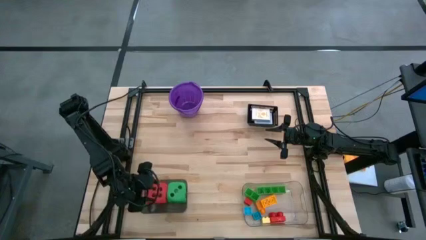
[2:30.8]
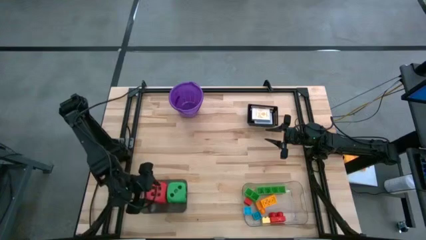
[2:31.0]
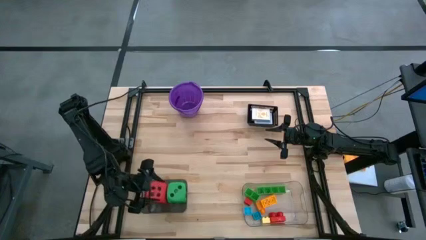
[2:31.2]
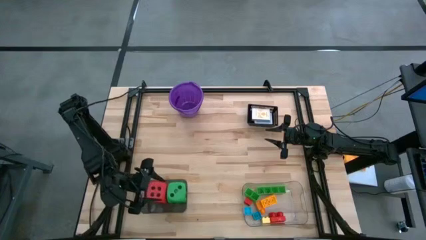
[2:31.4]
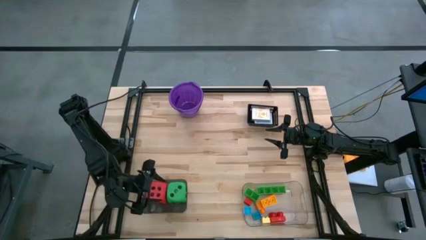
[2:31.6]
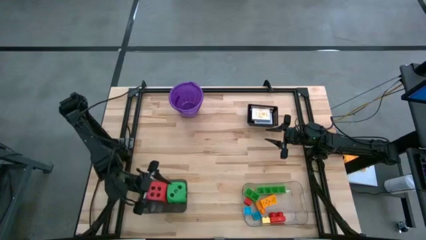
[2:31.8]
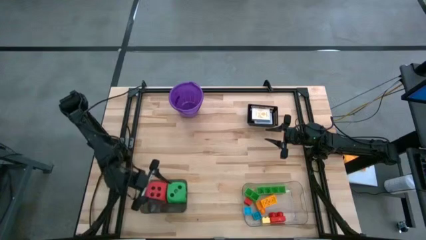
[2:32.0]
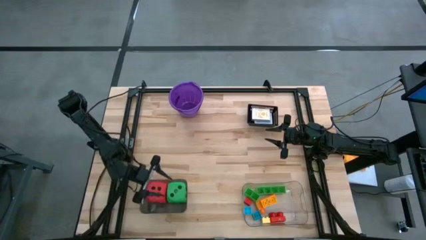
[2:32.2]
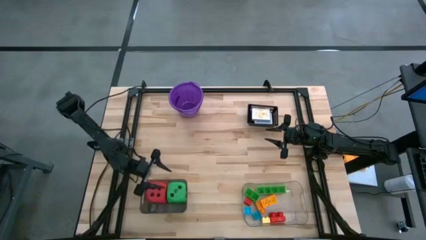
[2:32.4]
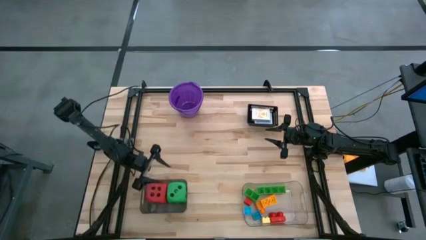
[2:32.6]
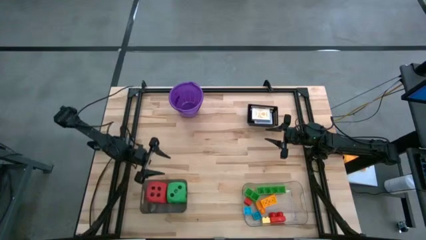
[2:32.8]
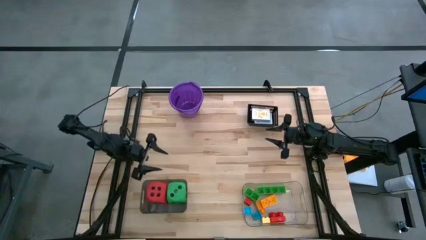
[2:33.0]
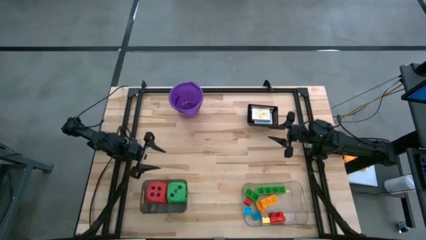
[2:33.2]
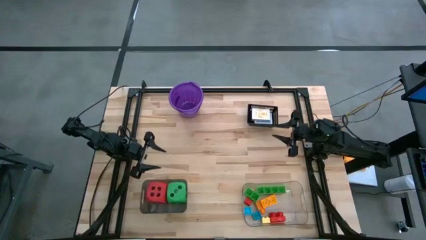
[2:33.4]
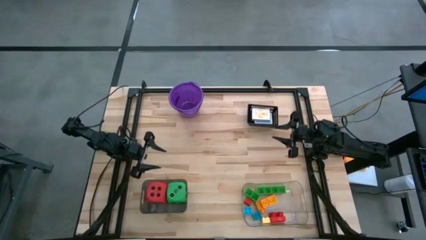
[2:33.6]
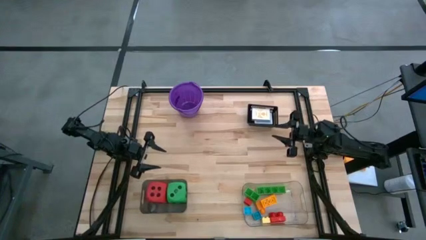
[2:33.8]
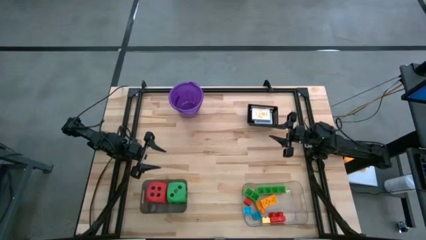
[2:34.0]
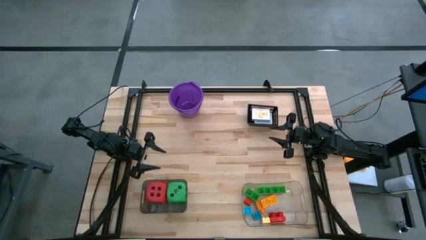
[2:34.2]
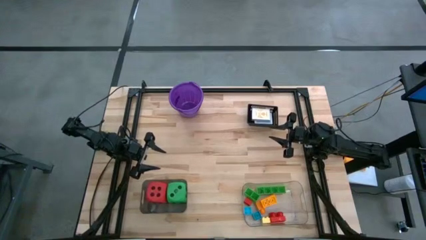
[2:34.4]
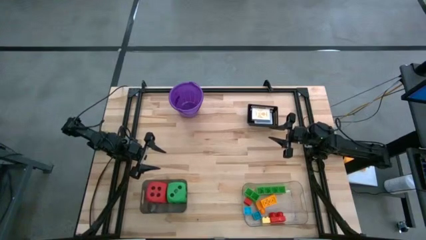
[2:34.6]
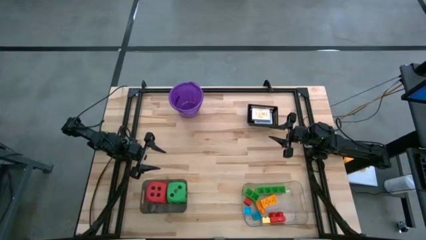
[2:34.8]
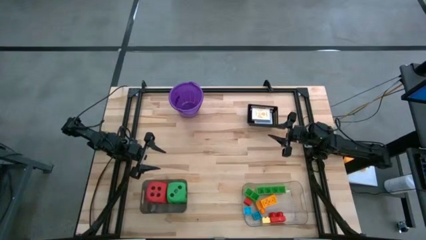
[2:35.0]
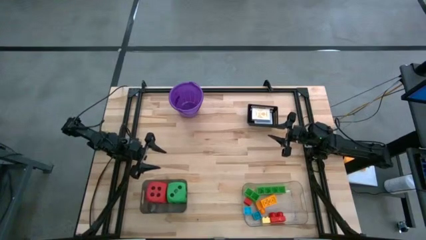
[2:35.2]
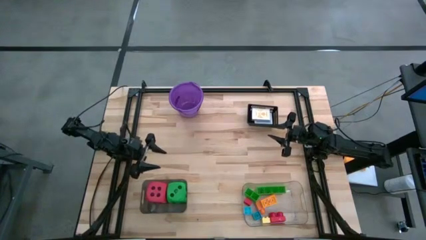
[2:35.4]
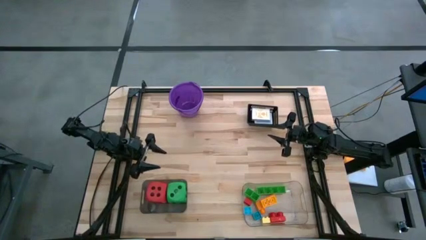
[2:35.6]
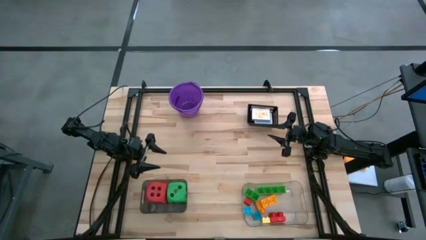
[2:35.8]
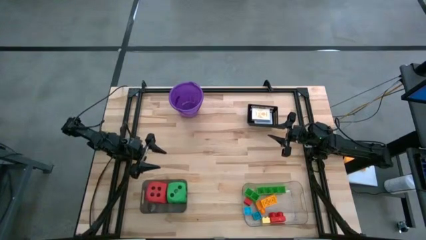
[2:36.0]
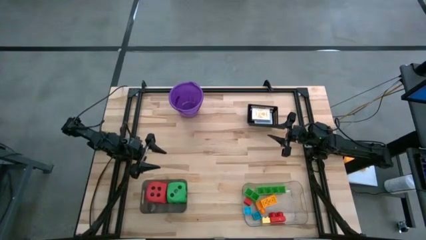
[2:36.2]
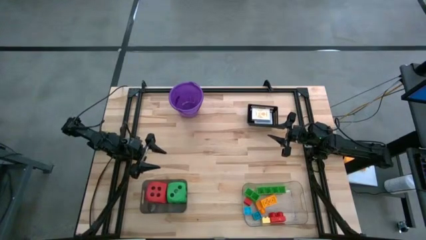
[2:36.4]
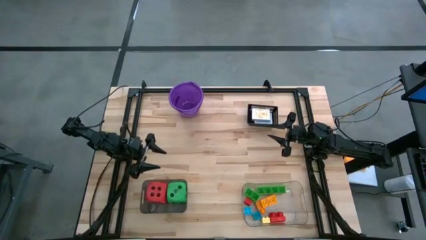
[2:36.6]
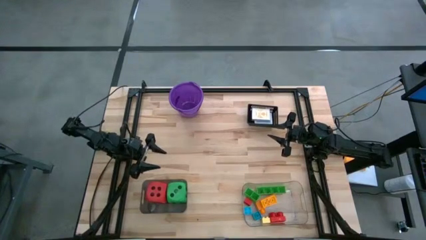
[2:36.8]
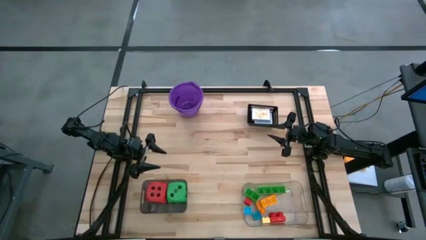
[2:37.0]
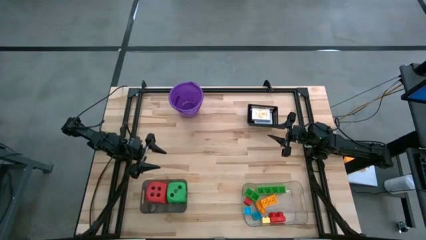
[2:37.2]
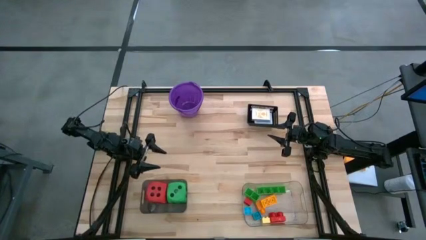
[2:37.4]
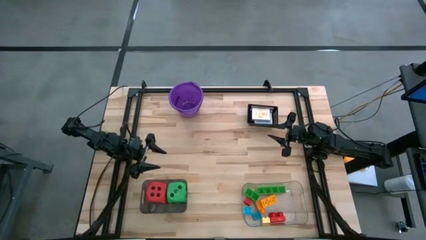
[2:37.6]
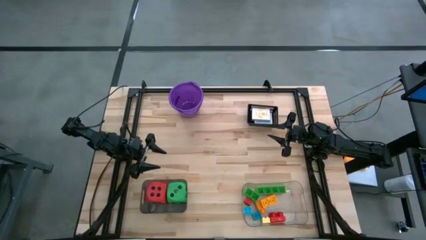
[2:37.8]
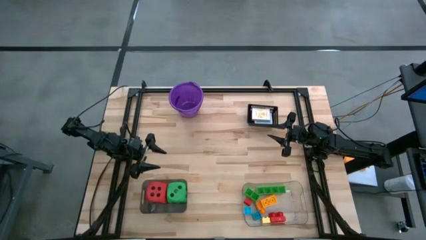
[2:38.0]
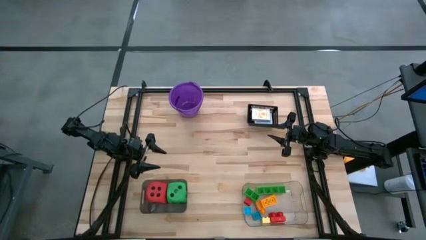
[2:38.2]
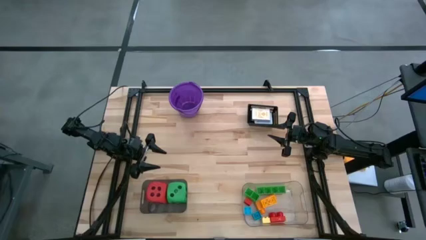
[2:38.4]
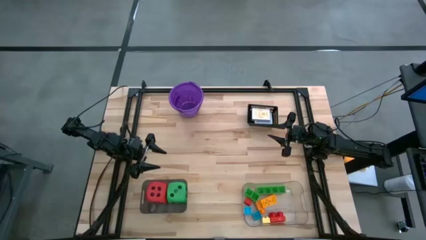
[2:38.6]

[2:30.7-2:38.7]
Task: Pick & Place Toys
Return to Home Position

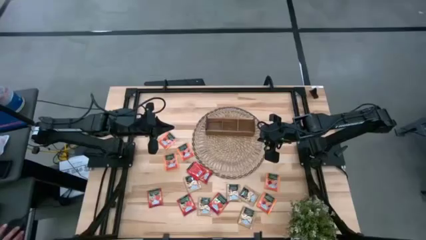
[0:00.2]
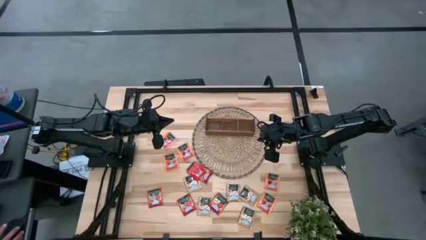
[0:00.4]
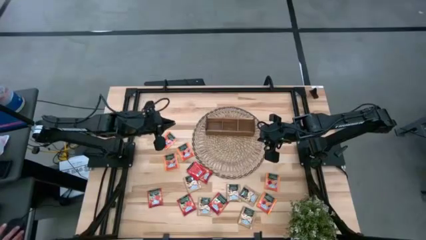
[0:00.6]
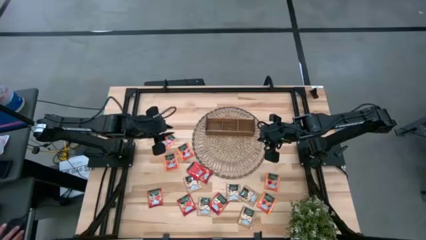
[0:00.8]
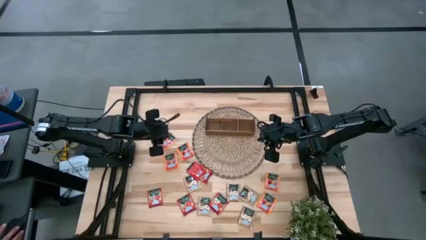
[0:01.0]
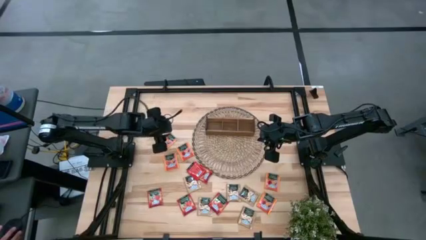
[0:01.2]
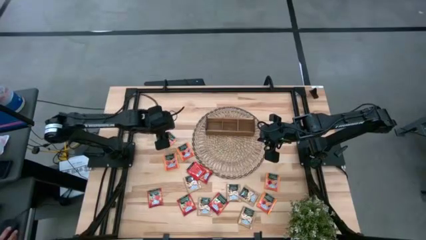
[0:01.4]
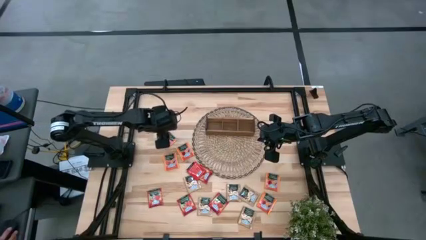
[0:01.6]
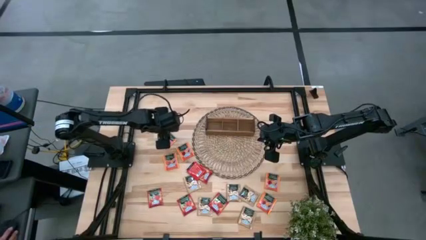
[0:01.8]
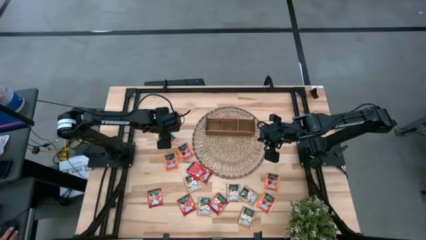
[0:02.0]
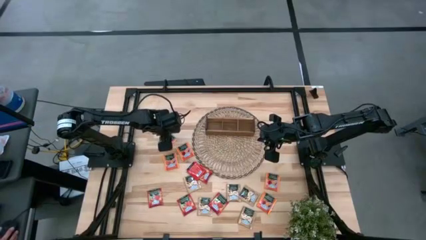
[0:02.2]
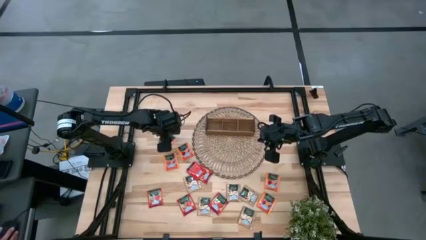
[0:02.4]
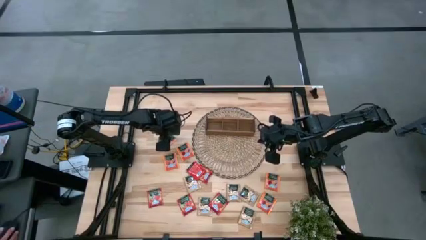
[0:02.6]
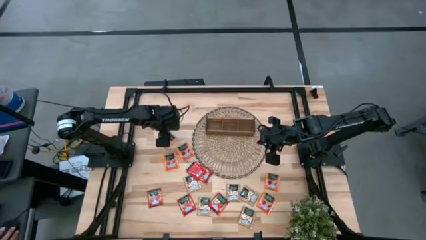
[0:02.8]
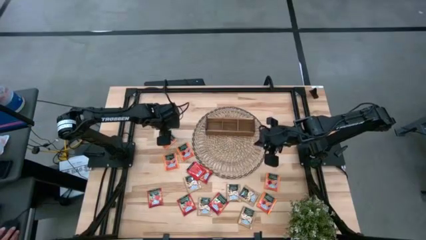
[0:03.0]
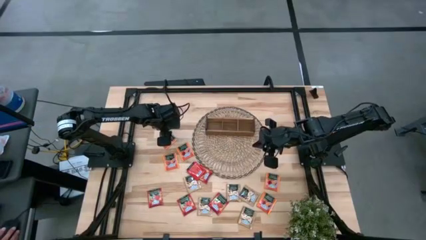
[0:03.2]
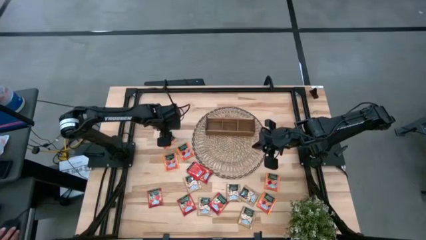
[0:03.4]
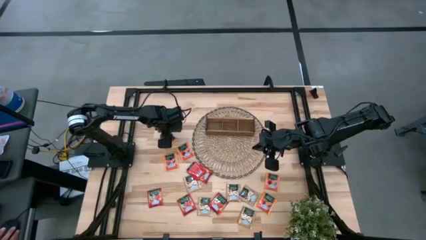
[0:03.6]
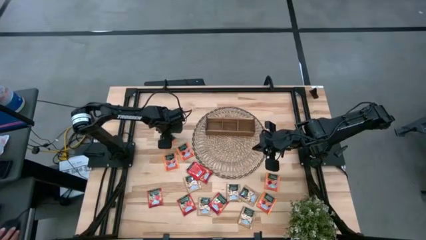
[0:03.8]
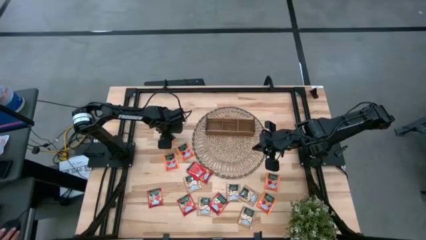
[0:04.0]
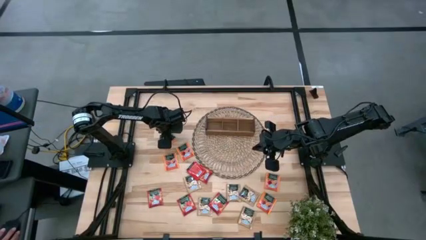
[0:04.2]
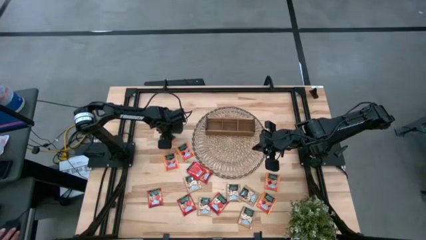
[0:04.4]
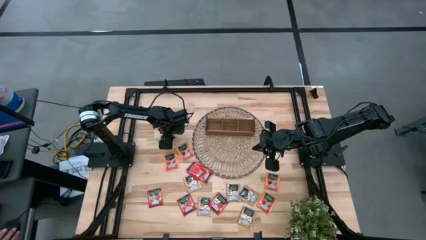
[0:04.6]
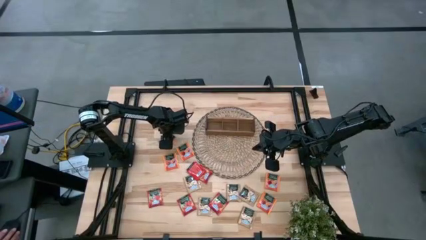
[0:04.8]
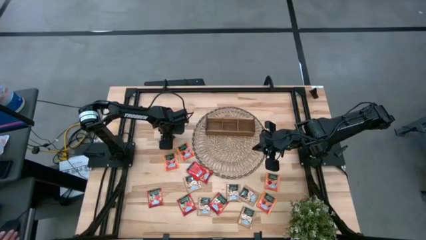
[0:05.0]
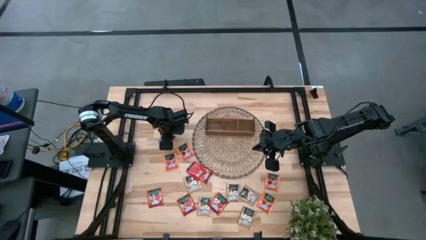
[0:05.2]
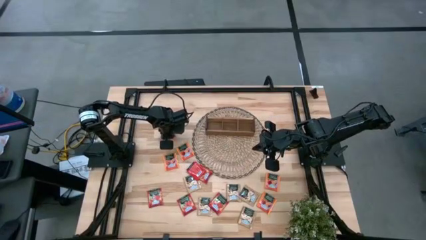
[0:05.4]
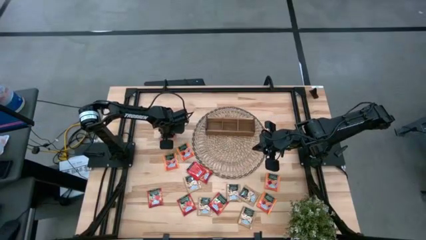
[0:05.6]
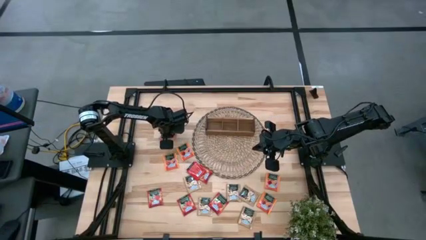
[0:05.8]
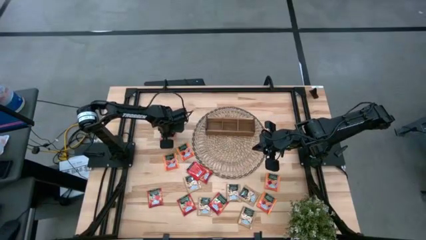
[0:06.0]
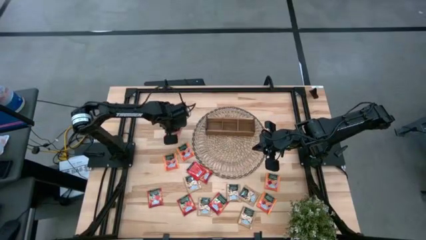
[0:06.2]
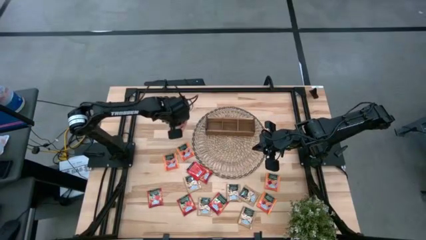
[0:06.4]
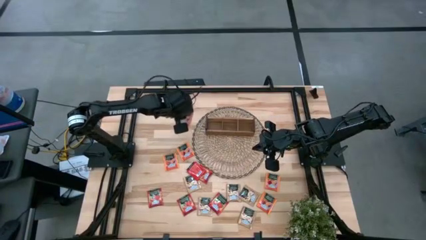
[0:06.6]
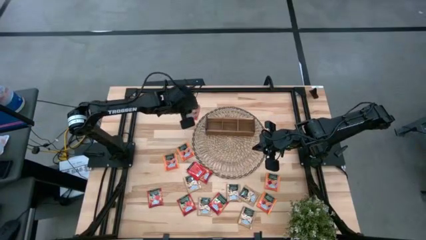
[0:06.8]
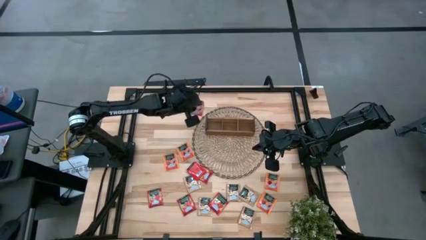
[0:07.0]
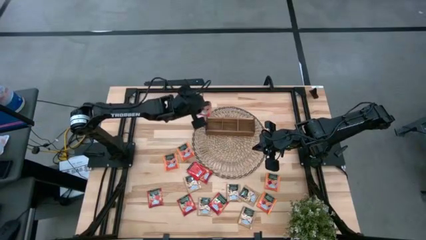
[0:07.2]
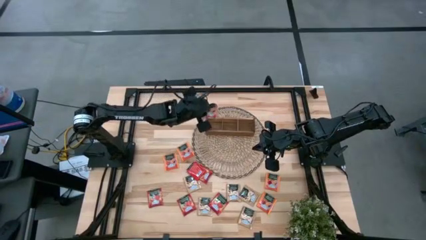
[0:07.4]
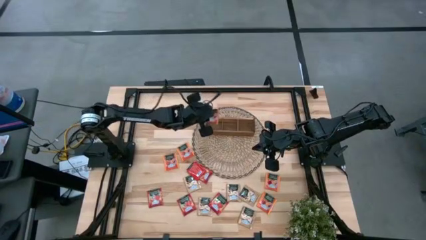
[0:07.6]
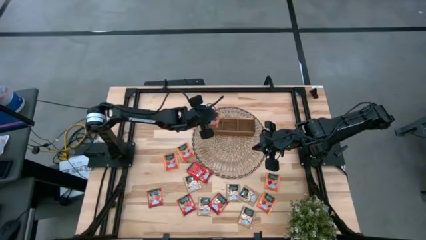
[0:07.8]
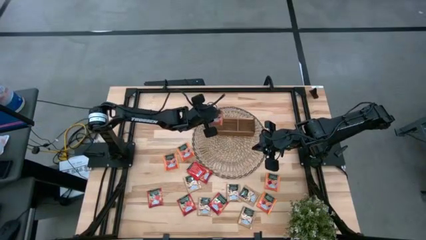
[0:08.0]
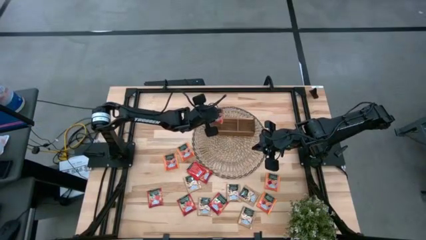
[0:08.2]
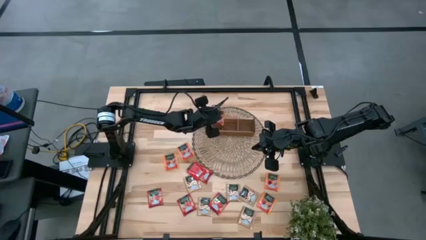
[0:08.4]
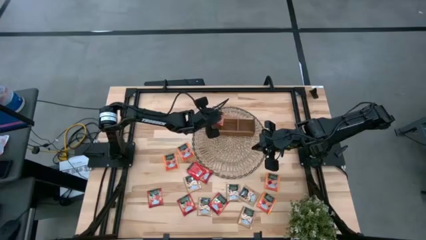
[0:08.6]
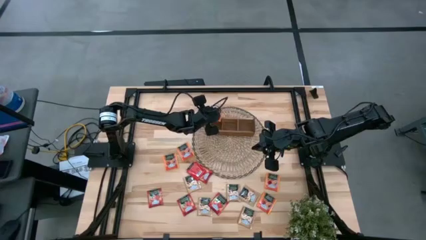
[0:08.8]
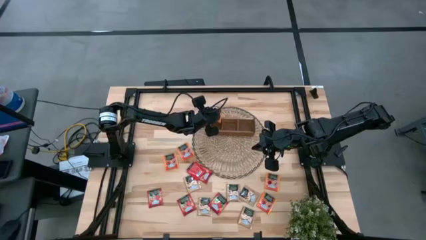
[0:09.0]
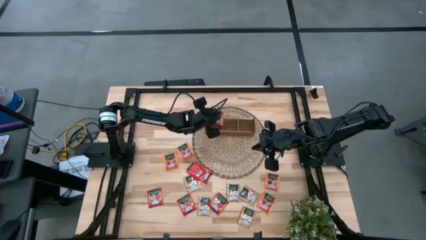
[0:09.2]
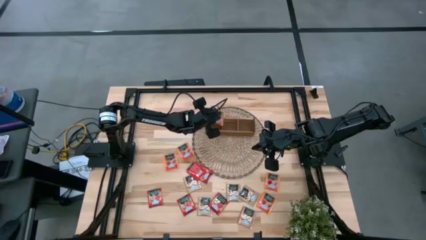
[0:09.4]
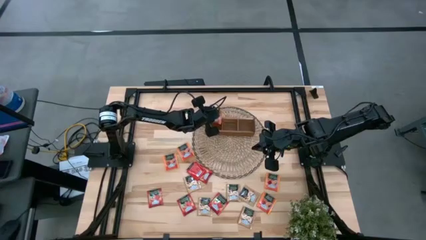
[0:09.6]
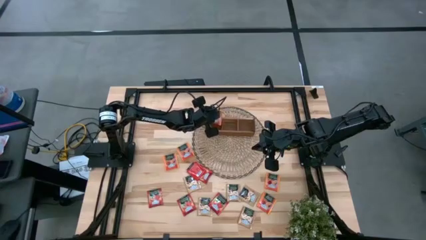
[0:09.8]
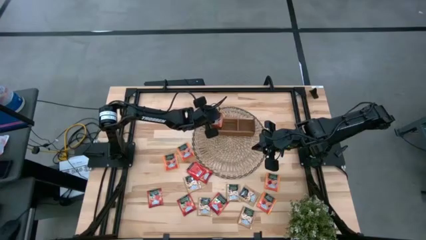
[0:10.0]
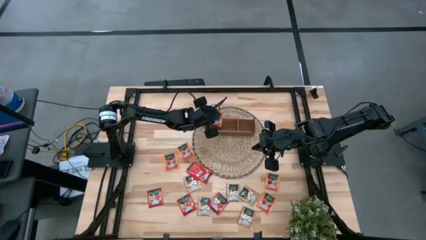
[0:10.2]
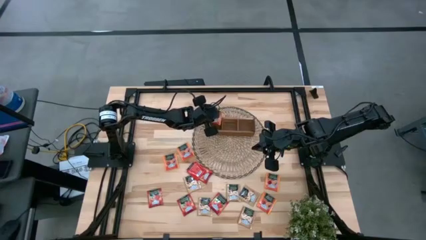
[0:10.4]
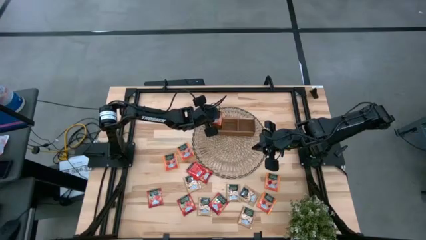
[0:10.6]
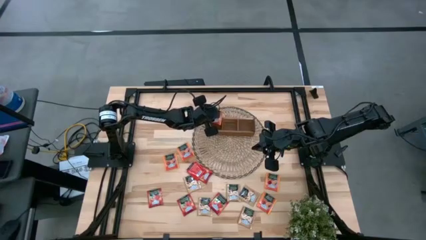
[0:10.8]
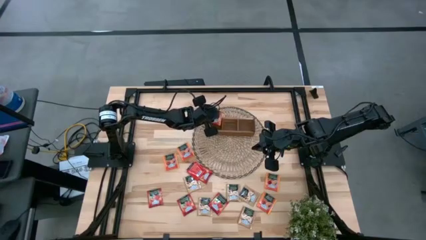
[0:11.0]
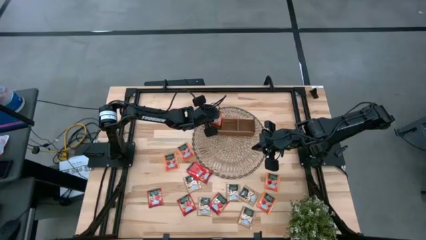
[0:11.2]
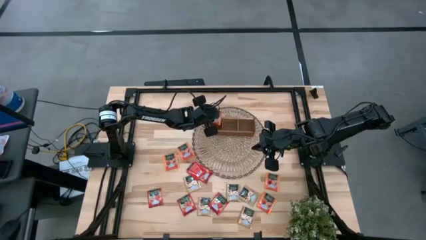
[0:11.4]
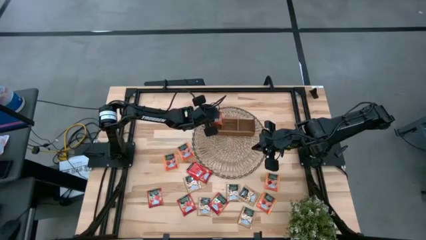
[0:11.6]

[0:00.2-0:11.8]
Task: Pick & Place Tea
Put the orange tea bag into the left section of the wooden organizer
